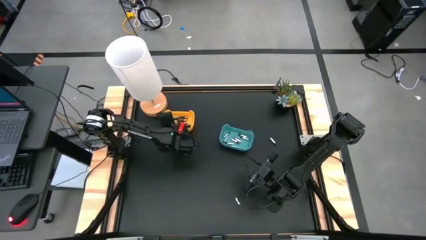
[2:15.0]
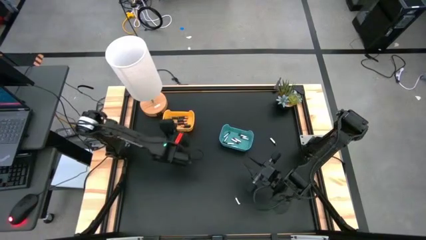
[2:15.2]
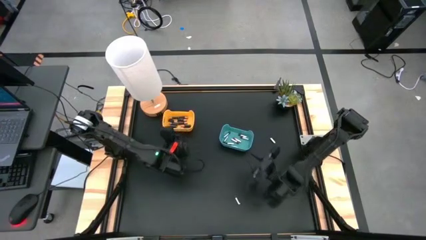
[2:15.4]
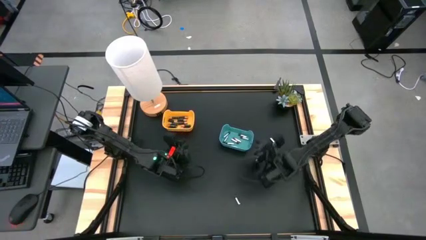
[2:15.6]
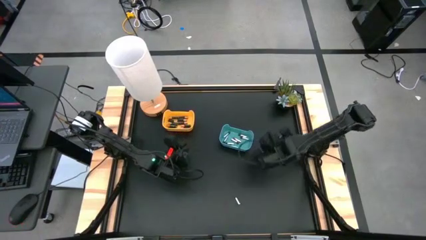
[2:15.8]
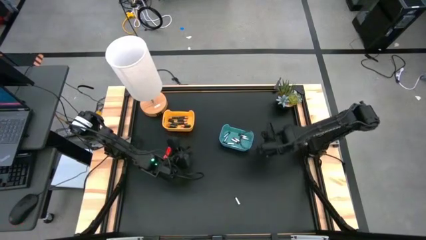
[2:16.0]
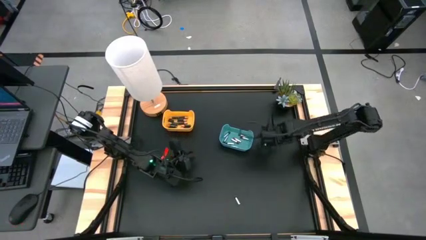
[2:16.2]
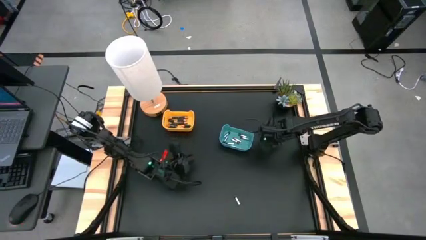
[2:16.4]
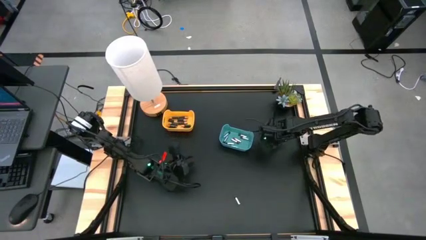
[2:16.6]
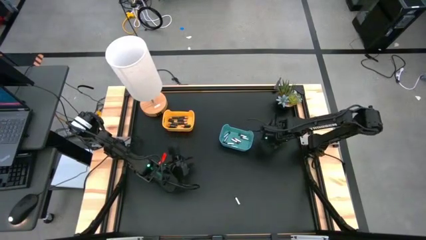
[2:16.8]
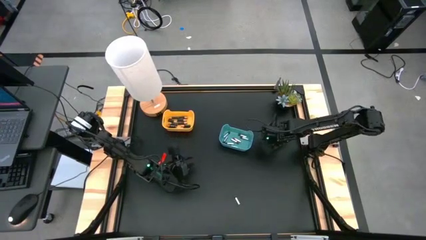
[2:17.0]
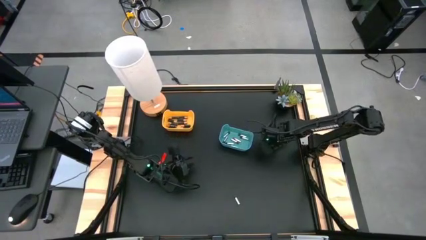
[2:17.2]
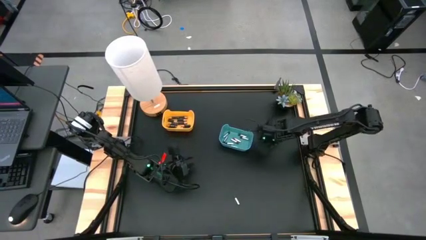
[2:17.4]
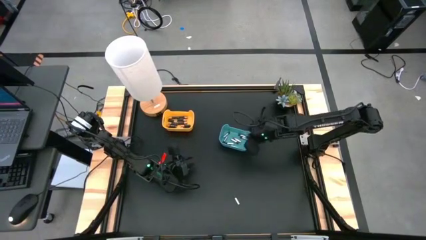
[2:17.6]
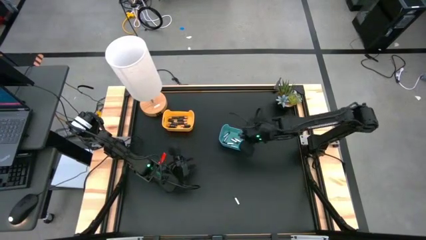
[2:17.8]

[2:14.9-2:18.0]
Task: Sort batteries
Put the top silver battery into the blue bin

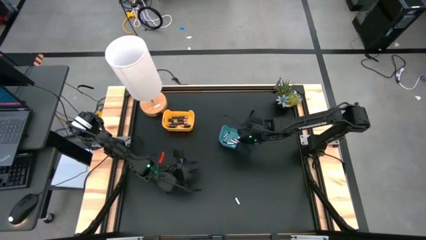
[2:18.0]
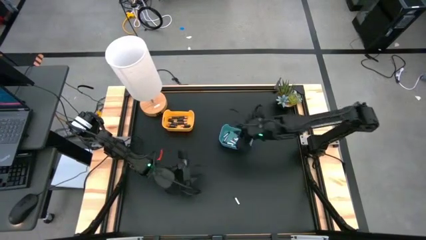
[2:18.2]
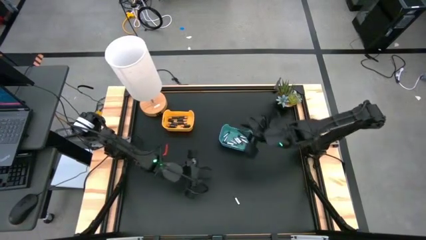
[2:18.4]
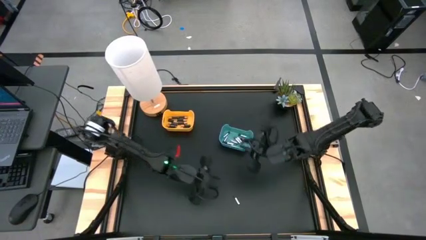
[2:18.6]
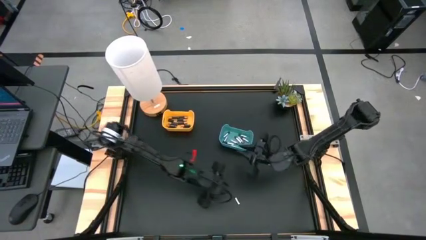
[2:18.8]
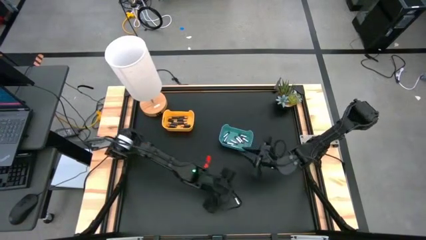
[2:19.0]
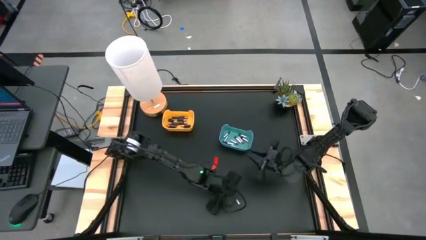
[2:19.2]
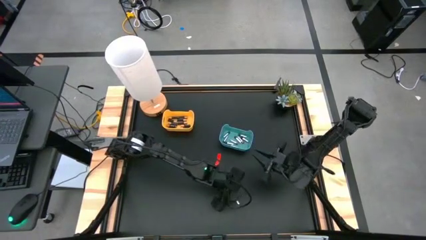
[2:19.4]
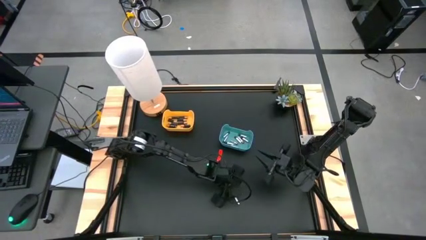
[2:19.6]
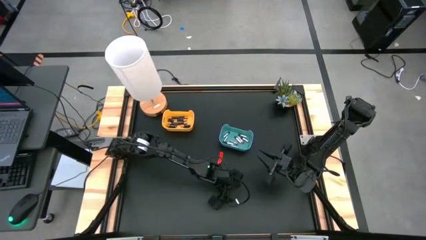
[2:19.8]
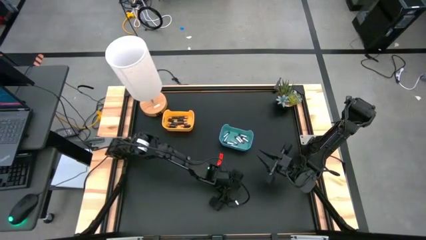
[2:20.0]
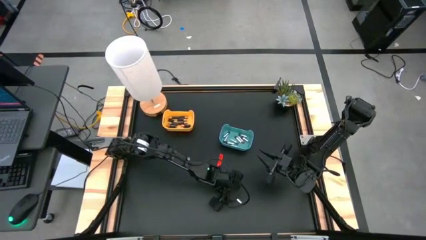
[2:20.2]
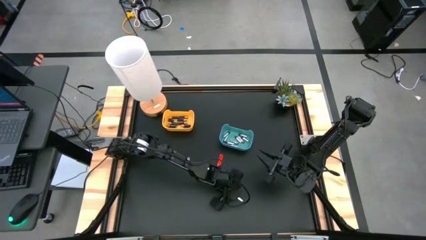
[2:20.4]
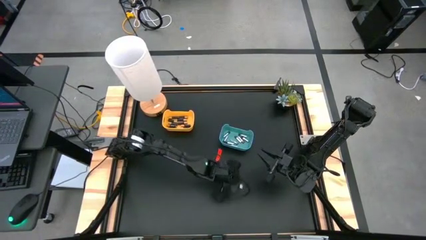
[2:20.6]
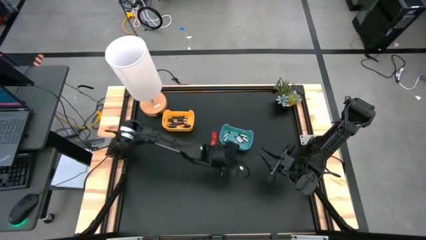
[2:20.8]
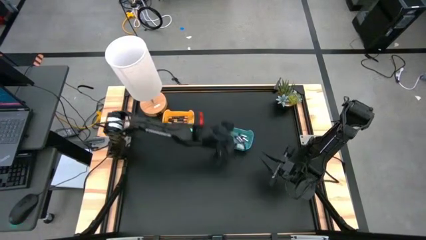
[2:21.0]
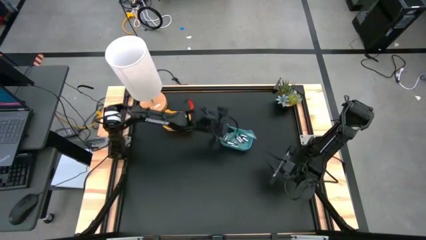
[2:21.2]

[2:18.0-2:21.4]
Put the silver battery into the blue bin

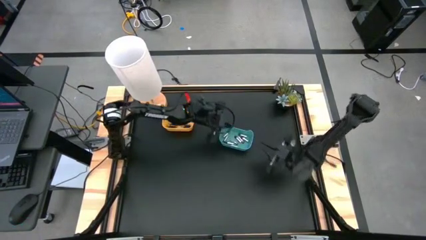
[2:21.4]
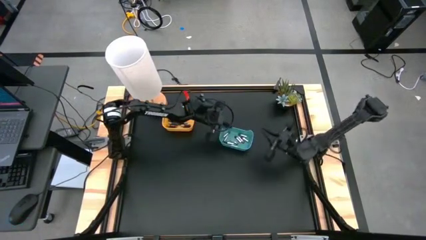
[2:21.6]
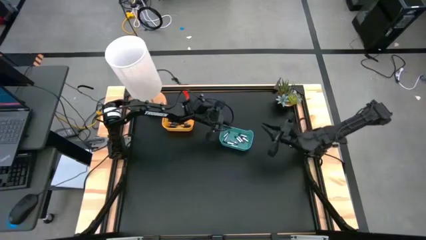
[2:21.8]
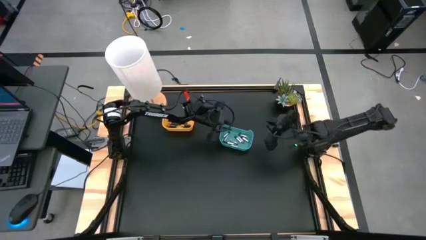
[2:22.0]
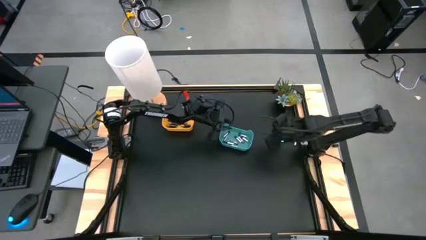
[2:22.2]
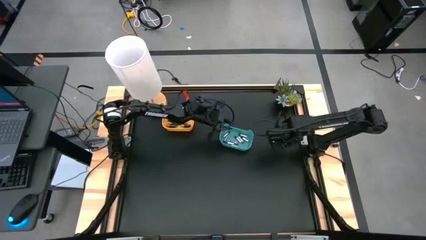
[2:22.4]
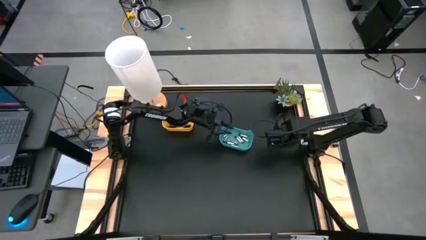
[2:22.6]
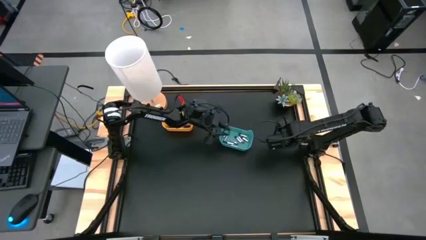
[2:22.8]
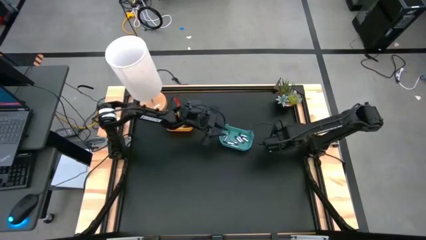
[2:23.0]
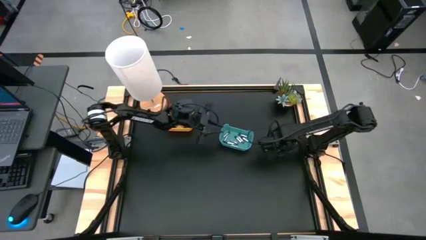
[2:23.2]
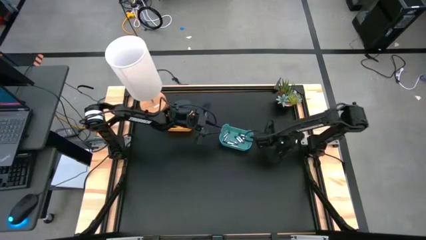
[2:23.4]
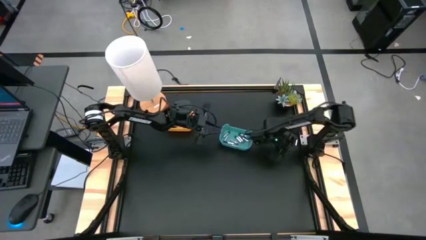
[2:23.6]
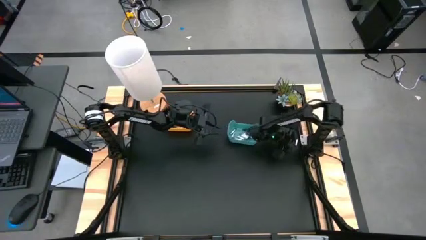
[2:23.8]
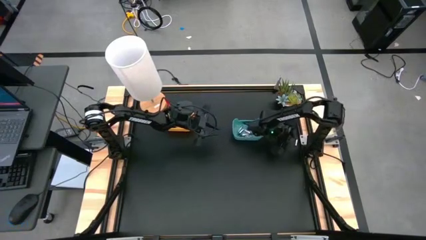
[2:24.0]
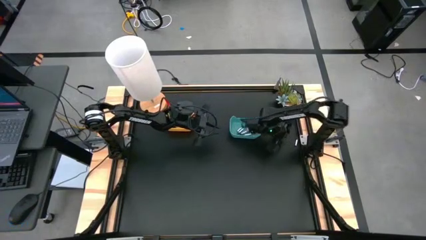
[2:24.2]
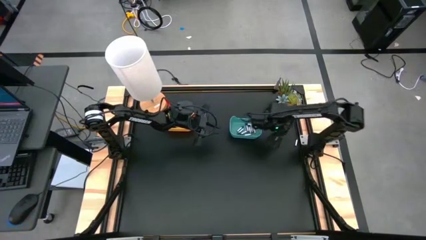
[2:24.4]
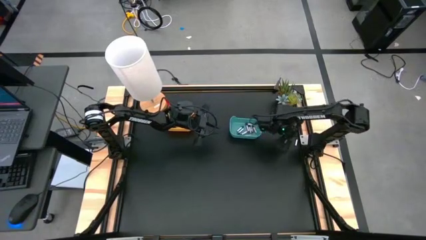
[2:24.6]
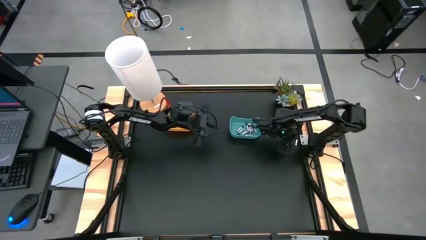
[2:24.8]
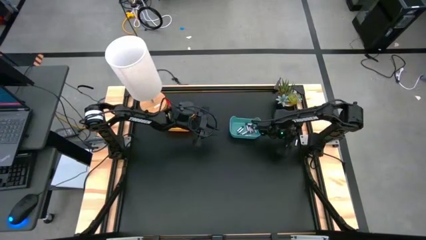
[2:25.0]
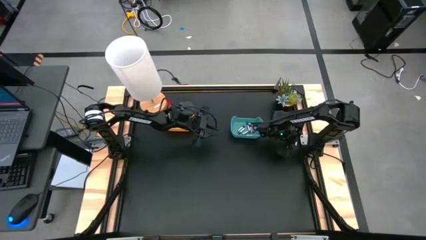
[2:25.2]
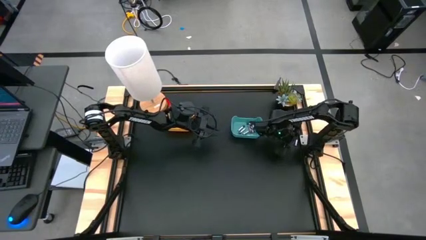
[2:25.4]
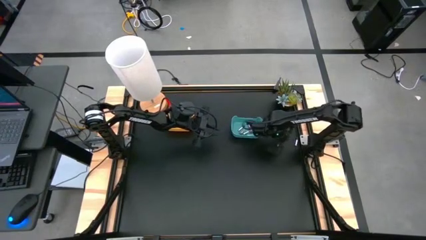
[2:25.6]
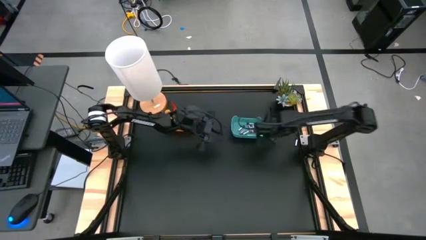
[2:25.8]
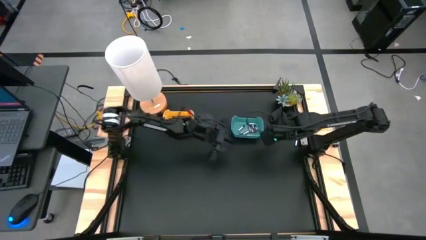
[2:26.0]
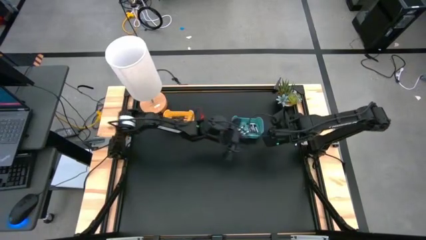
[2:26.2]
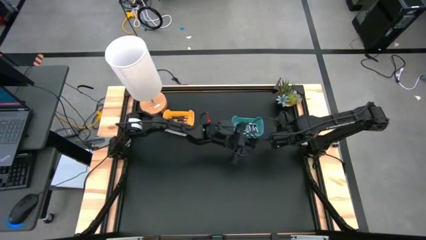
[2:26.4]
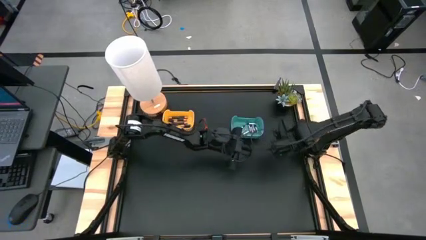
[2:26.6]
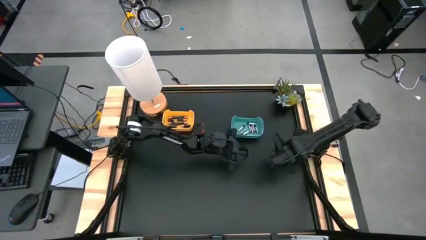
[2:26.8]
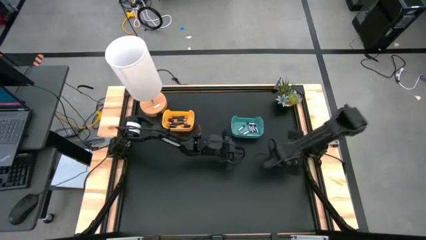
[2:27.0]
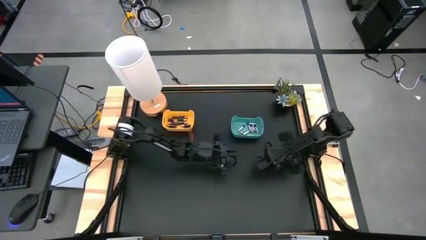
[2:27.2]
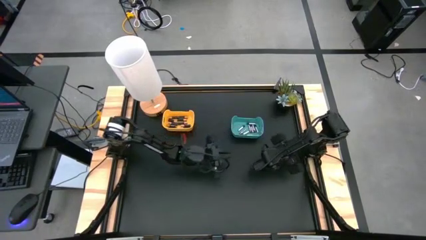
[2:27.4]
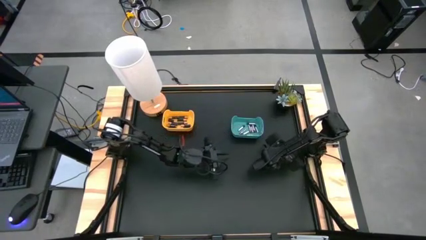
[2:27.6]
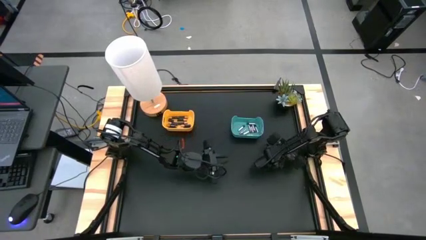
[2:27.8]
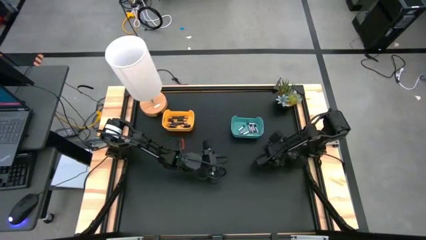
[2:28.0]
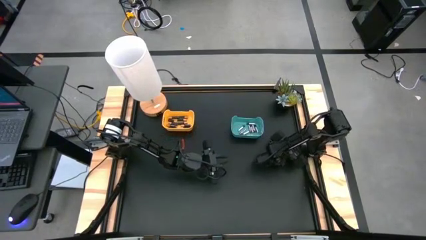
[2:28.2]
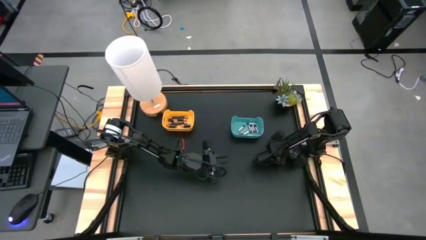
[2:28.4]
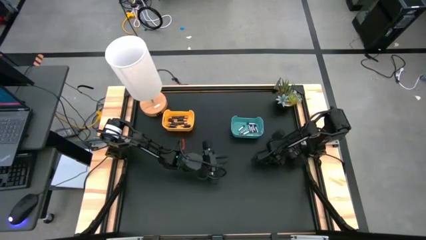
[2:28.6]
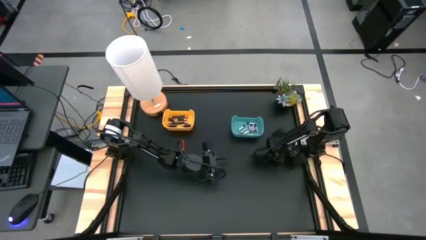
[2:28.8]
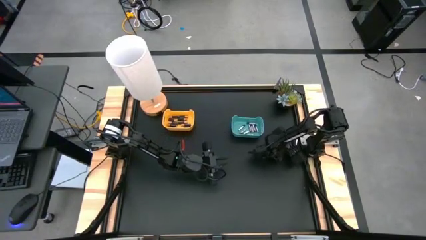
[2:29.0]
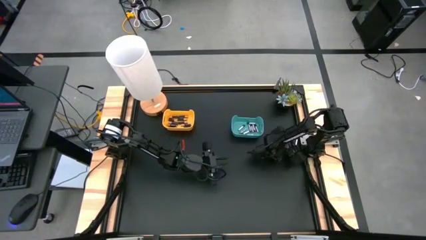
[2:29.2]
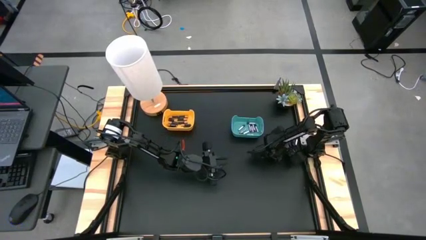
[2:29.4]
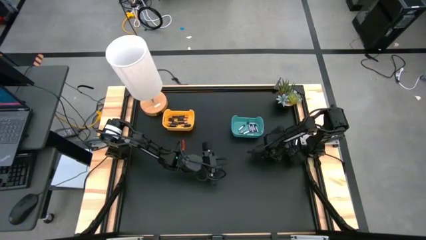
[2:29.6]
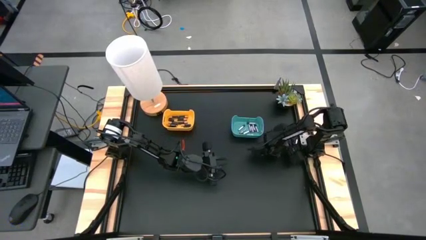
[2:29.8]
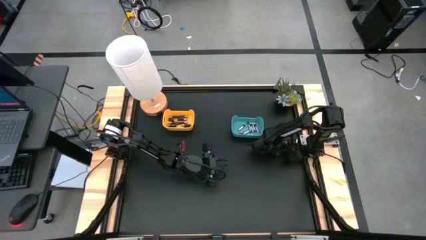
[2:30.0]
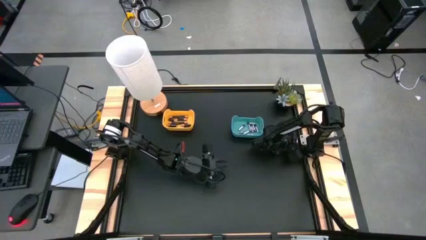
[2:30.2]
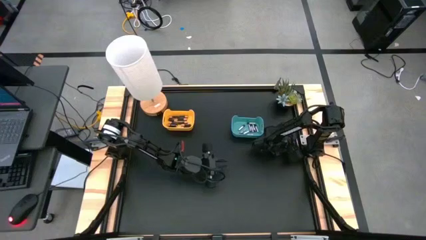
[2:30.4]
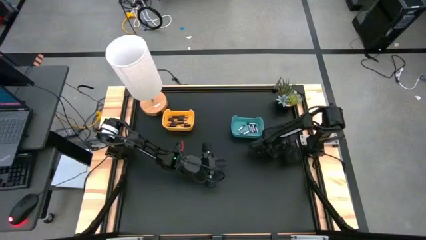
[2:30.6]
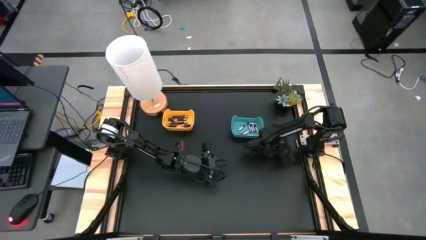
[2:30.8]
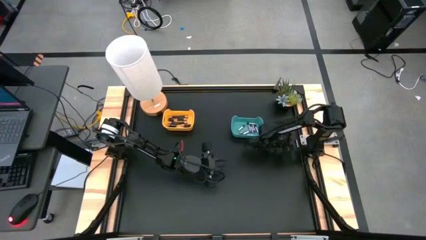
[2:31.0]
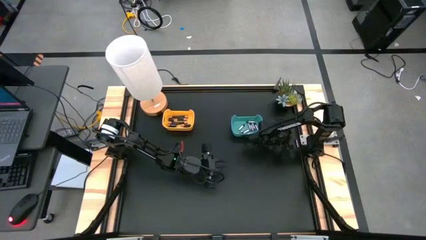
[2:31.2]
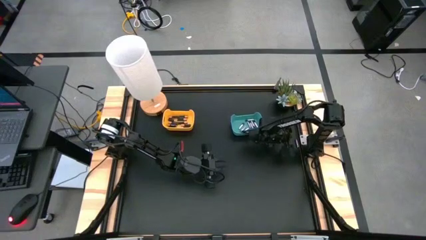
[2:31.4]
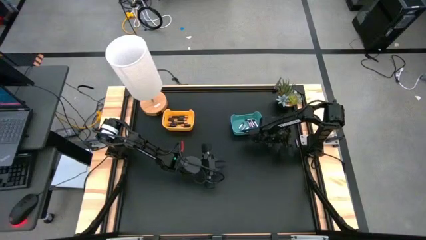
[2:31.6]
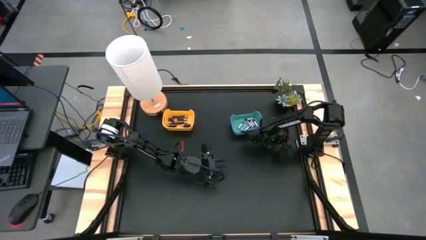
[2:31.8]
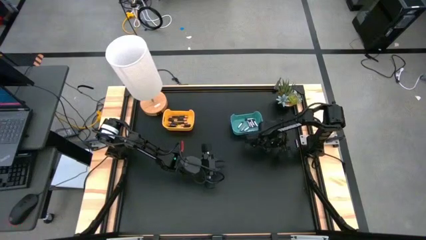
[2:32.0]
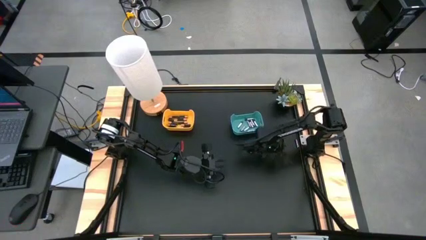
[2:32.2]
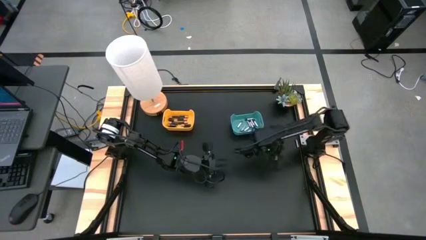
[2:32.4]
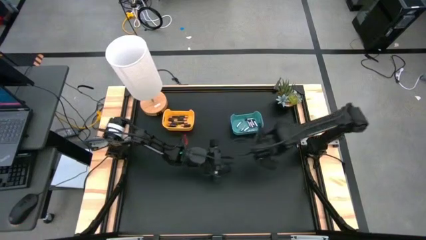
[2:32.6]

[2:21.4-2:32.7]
Put the silver battery into the blue bin
